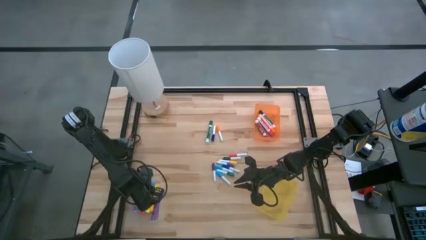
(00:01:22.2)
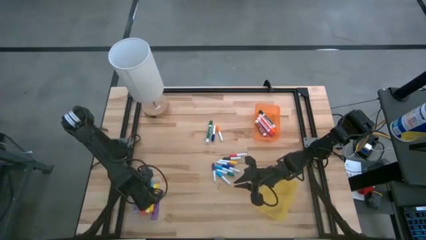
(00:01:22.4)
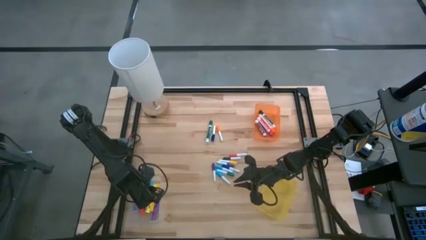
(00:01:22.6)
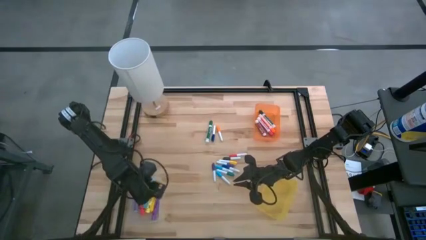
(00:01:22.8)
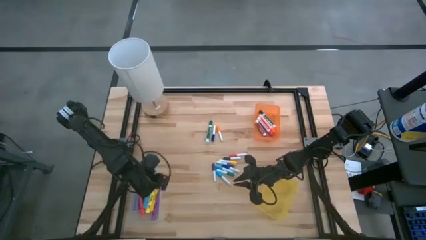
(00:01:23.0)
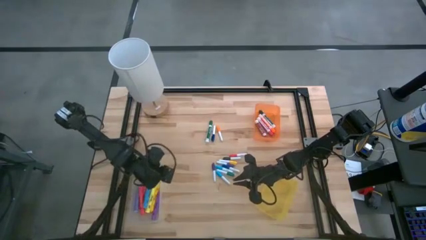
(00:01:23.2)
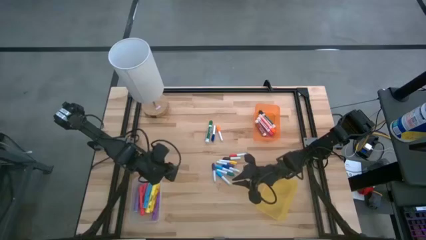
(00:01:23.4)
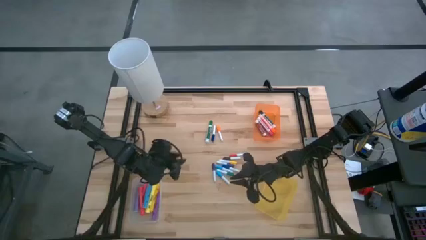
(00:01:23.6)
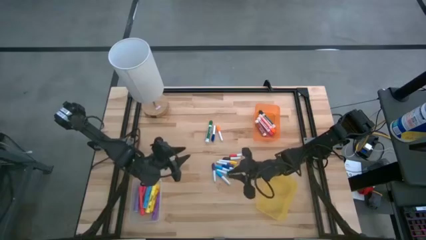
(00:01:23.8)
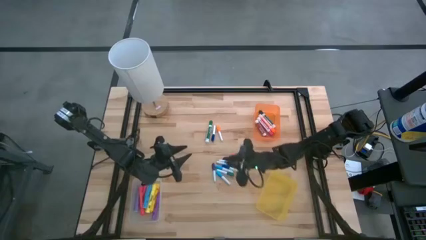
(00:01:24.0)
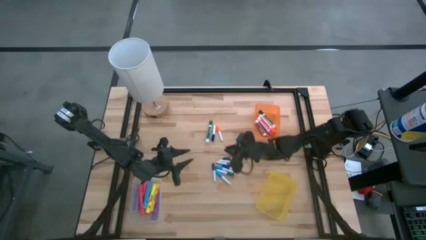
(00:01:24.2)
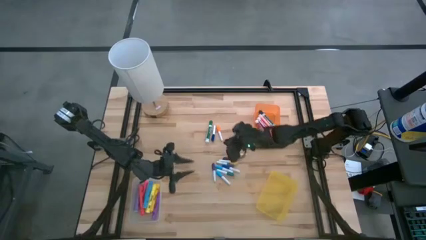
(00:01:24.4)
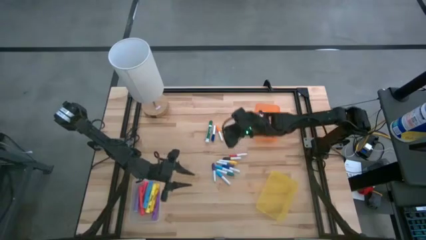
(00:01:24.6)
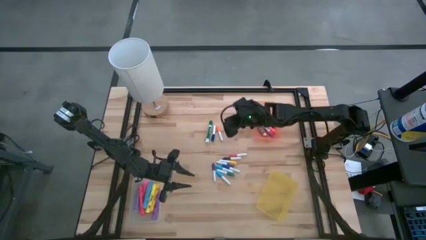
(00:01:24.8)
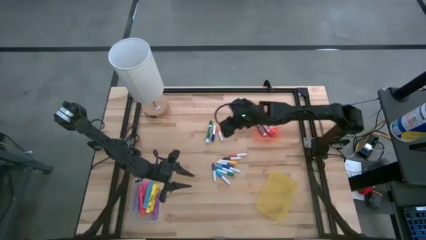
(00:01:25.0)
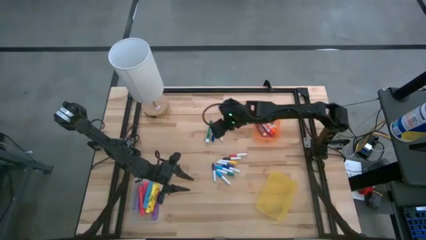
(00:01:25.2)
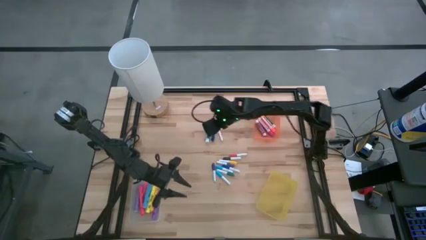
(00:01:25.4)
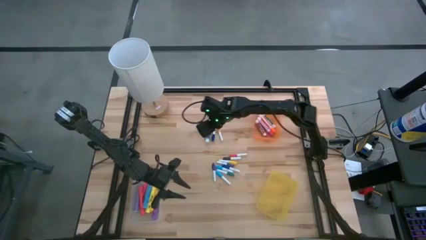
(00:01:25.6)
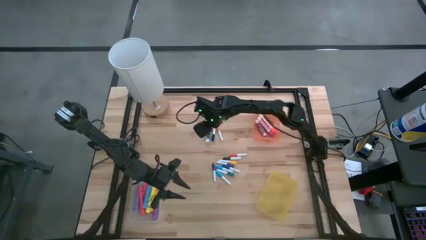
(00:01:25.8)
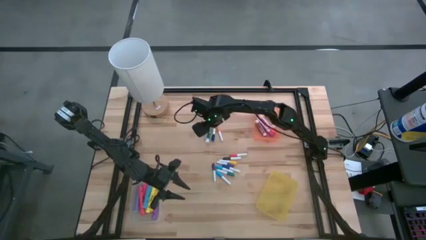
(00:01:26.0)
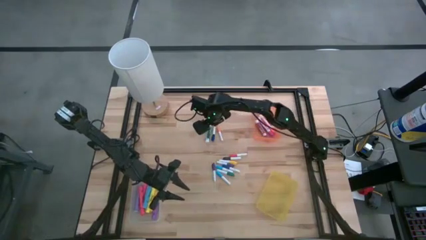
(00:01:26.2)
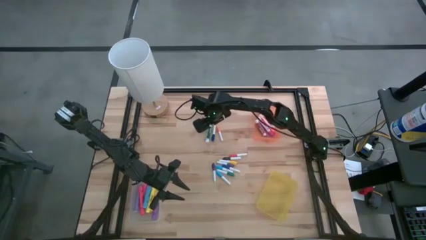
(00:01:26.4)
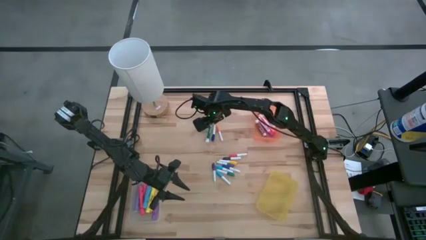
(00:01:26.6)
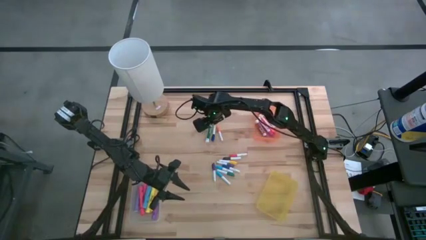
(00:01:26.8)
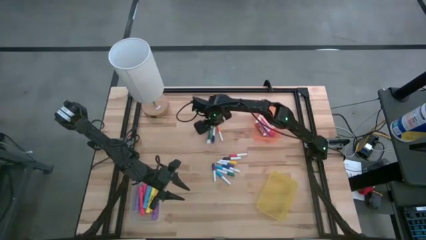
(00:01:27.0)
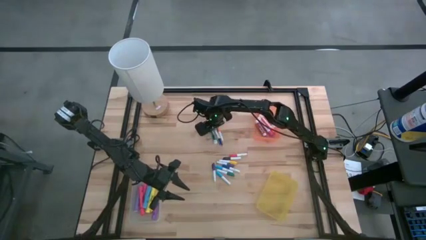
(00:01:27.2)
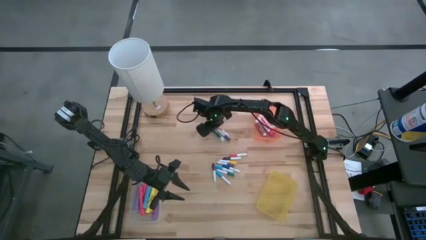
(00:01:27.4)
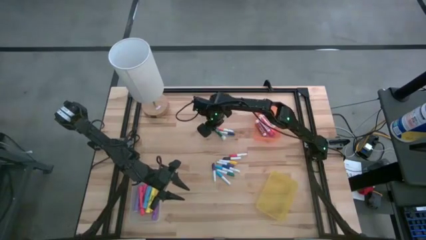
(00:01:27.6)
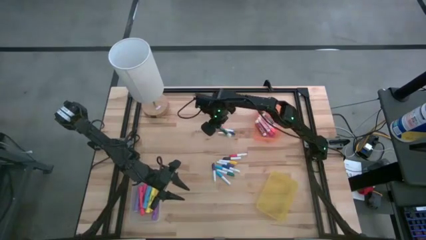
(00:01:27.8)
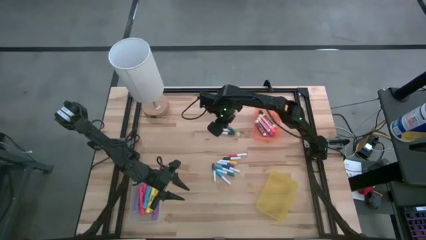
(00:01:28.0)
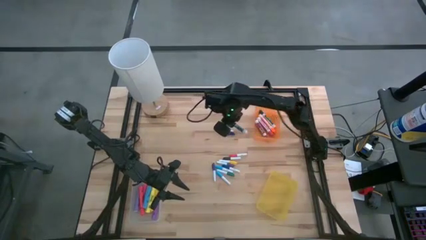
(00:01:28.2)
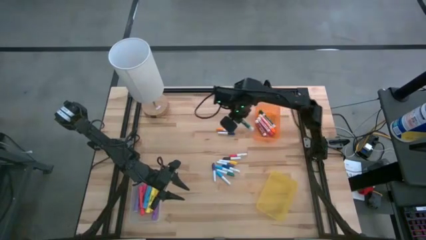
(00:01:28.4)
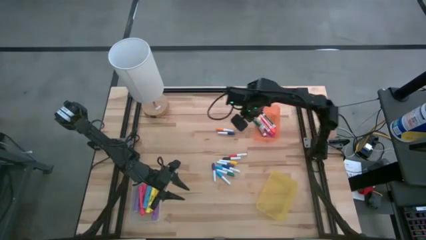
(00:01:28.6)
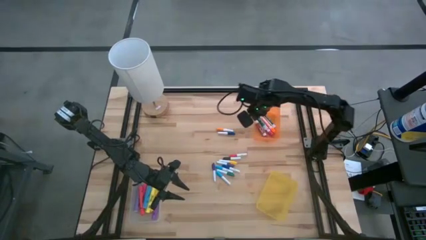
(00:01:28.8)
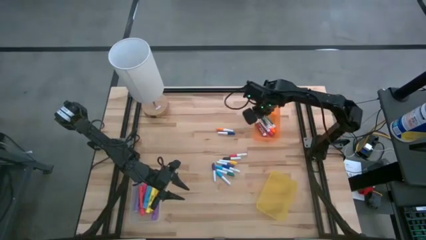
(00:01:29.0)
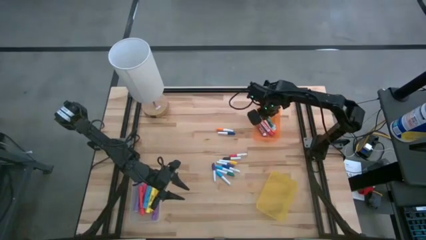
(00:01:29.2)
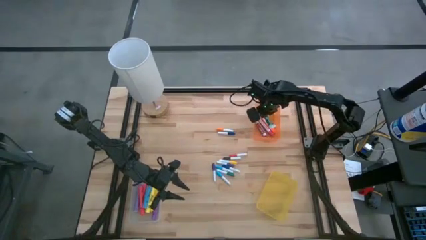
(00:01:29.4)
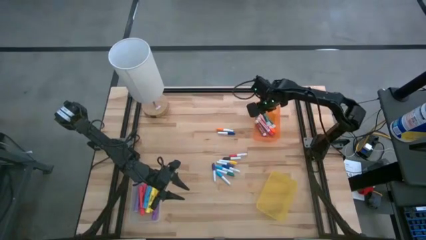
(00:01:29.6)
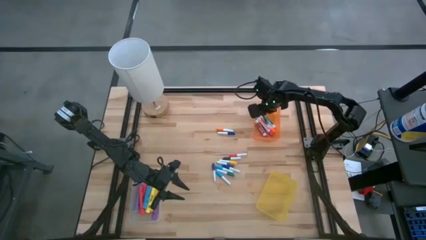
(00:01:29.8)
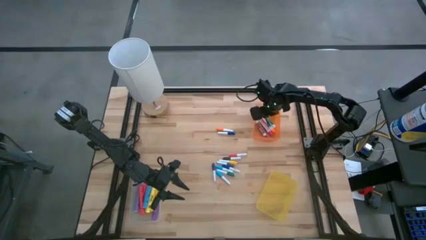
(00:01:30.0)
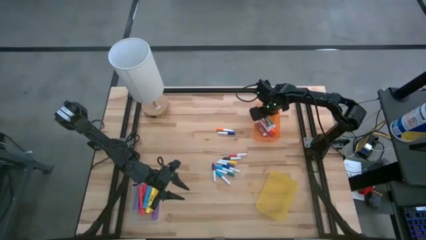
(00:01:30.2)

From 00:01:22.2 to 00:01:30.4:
Task: Pick & Place Markers
Put the green eraser marker into the orange bin

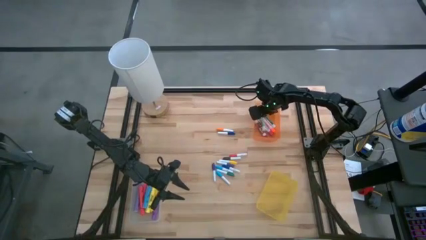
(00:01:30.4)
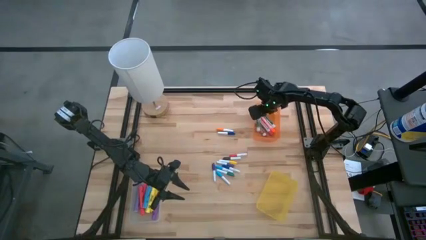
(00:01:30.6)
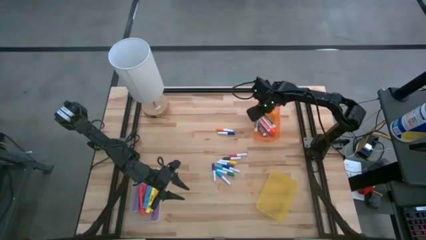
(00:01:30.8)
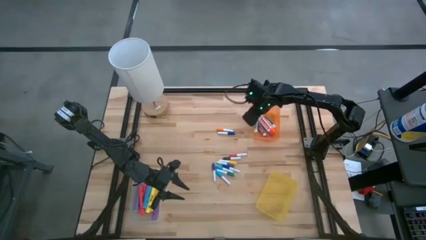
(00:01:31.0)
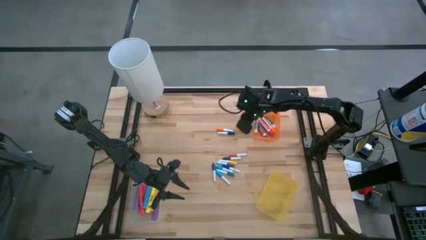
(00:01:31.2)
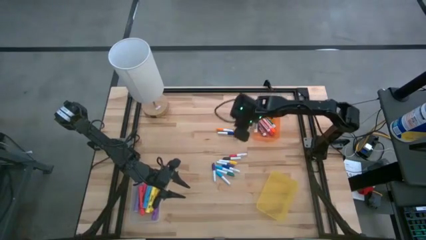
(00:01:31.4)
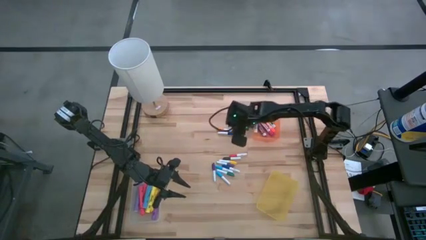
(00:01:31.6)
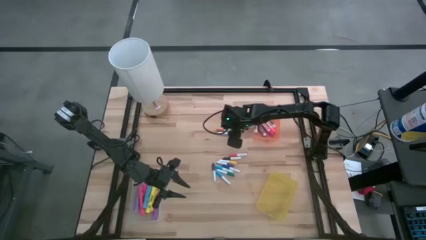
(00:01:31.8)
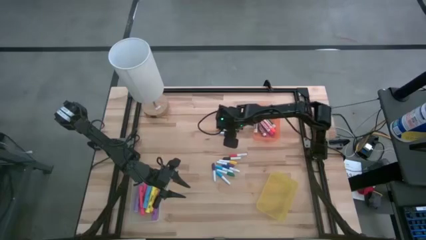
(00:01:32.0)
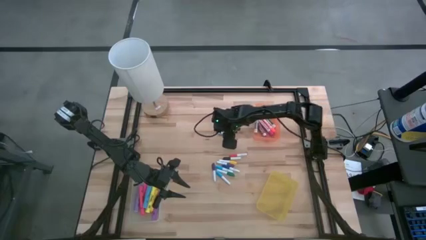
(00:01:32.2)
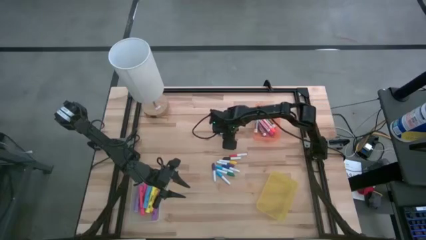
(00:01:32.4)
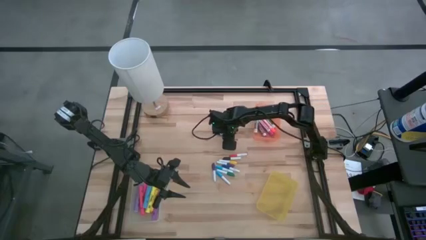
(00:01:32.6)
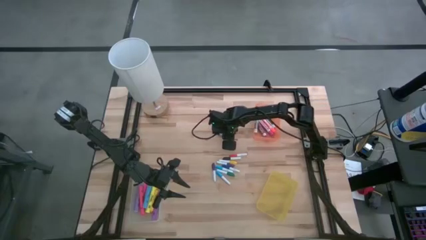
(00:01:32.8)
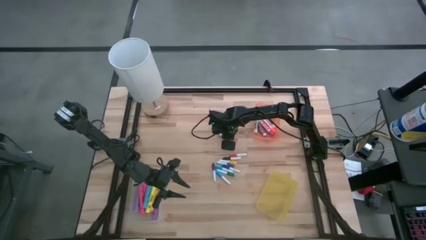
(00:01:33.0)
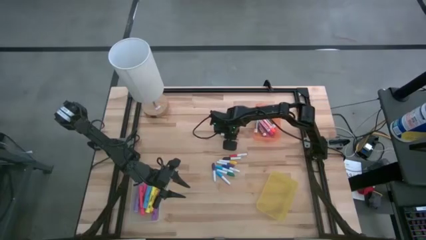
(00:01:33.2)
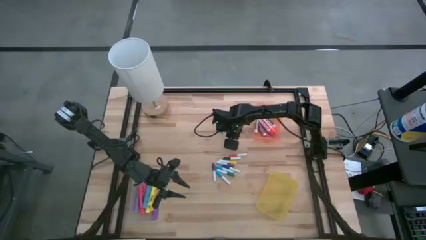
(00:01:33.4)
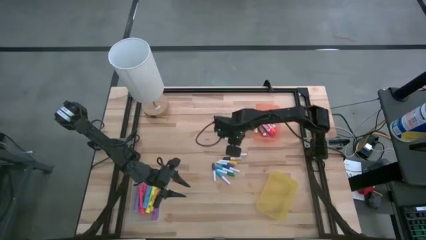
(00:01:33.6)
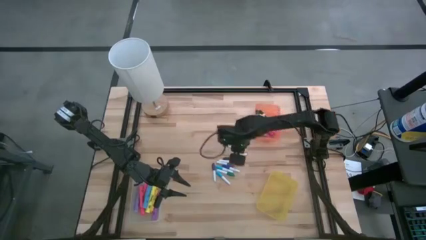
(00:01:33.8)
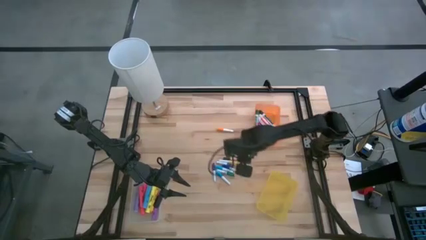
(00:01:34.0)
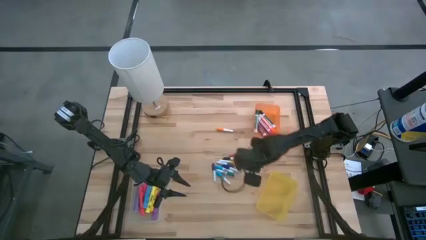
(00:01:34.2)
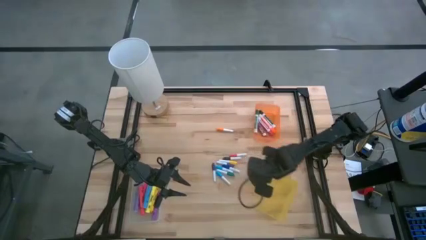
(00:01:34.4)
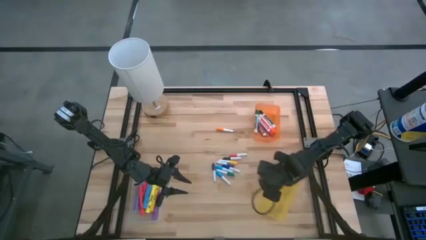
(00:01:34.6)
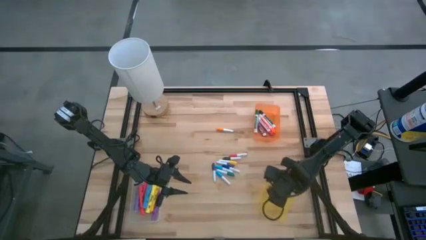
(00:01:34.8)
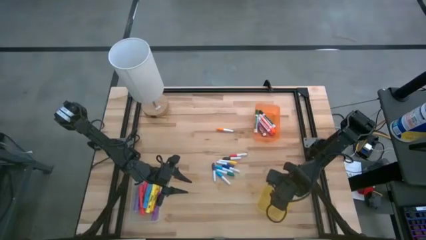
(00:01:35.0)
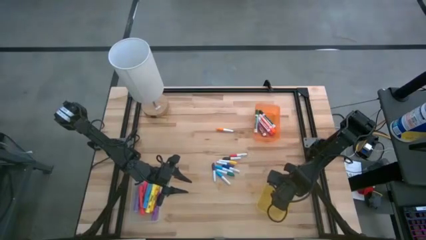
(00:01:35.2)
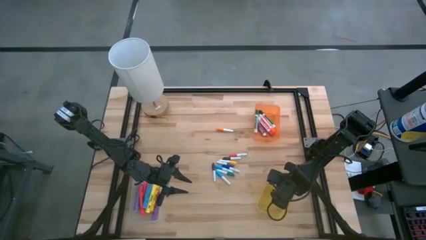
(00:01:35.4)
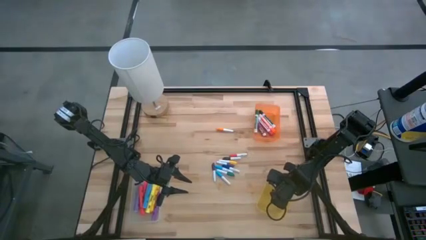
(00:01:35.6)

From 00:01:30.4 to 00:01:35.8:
Put the blue highlighter pen into the yellow bin

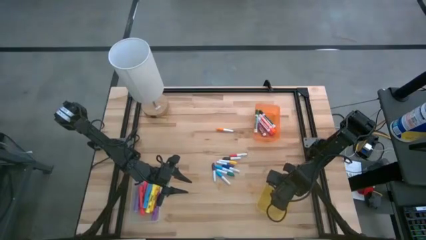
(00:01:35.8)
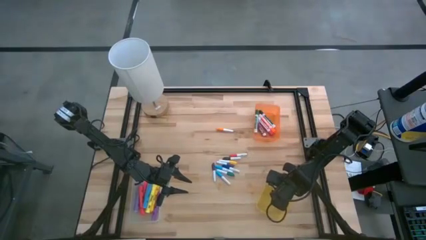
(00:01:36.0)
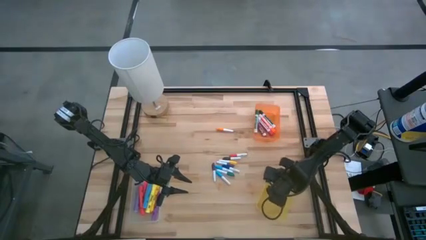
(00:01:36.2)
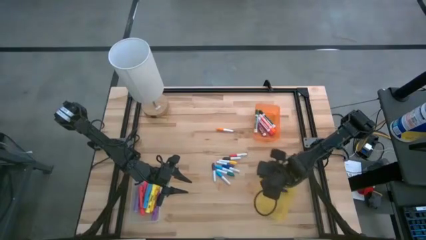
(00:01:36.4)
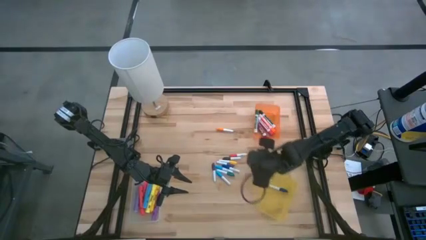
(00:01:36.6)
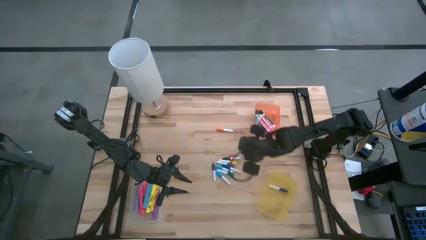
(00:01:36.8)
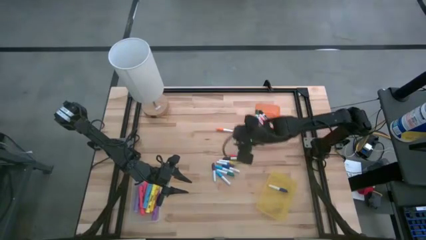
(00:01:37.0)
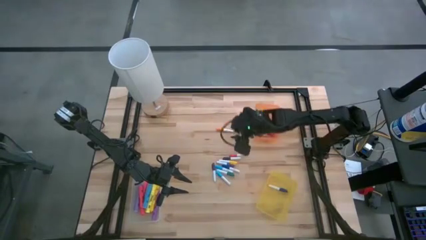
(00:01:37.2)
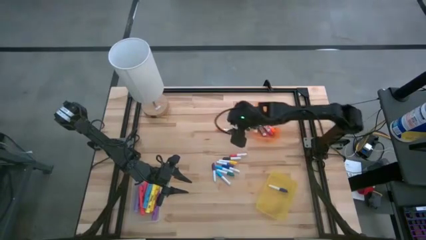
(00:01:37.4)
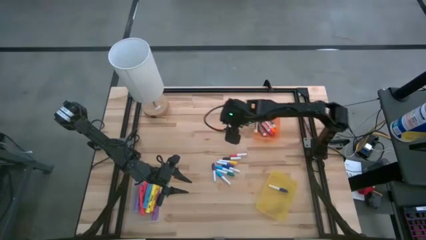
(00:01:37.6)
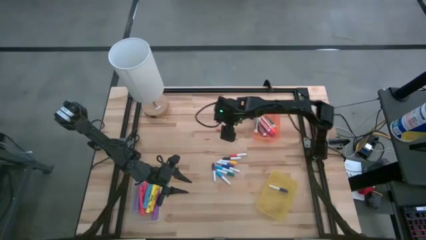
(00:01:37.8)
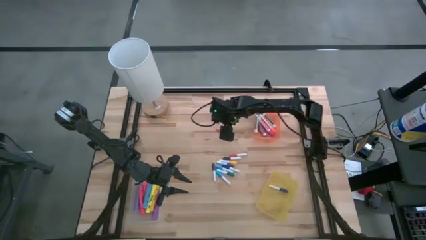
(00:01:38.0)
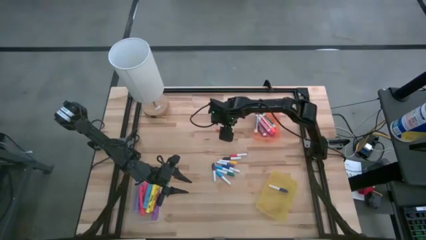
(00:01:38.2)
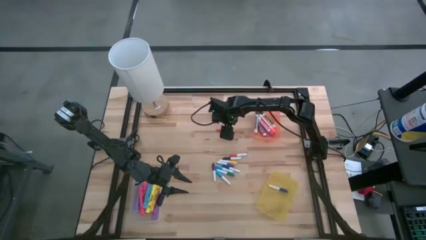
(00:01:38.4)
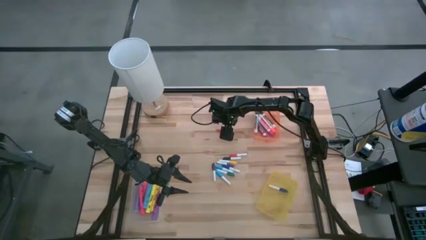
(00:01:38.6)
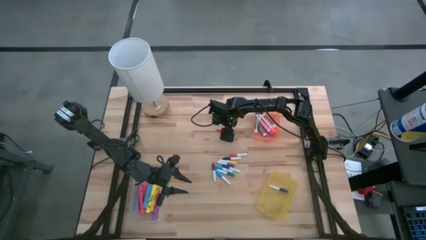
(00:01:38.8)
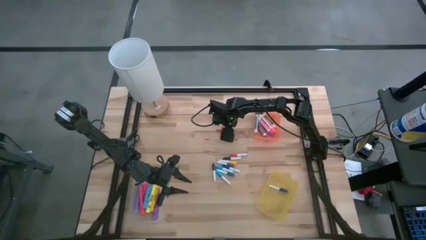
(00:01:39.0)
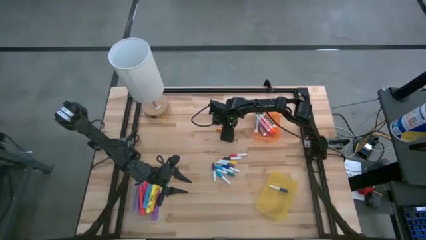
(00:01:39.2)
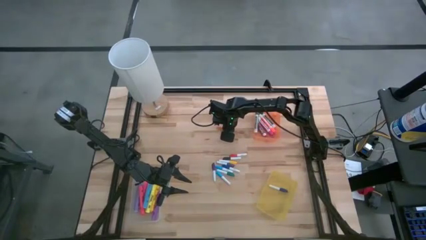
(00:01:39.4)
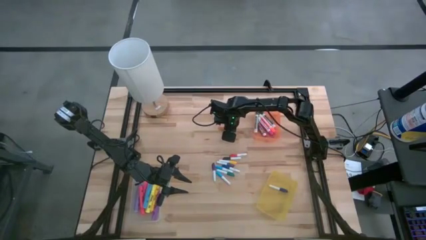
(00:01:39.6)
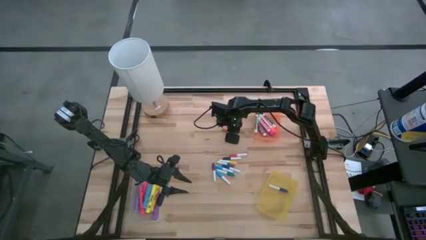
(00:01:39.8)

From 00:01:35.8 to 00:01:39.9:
Put the orange highlighter pen into the yellow bin
